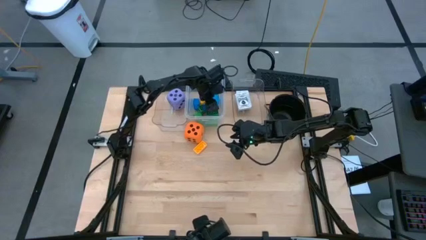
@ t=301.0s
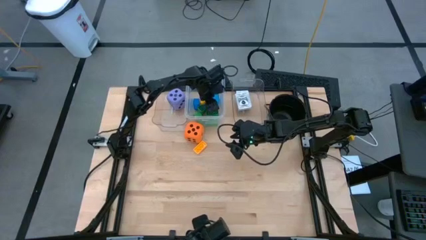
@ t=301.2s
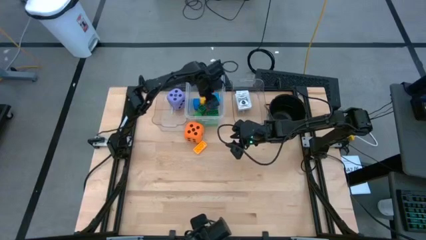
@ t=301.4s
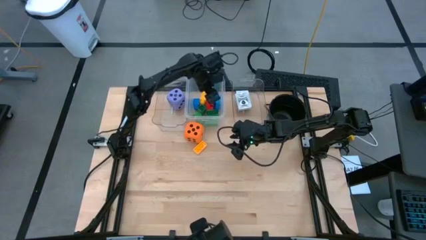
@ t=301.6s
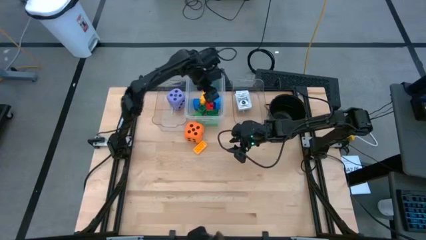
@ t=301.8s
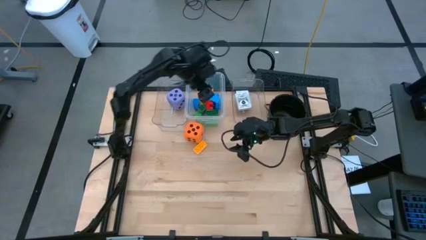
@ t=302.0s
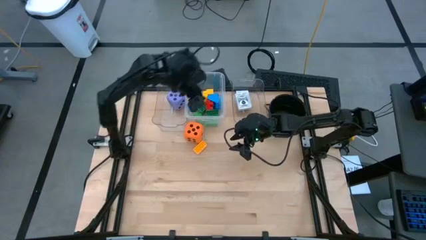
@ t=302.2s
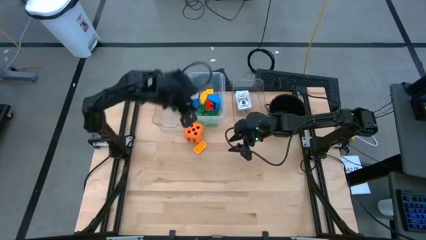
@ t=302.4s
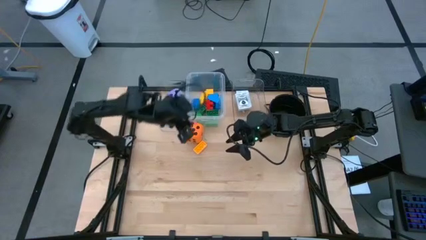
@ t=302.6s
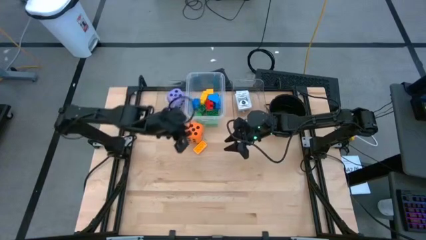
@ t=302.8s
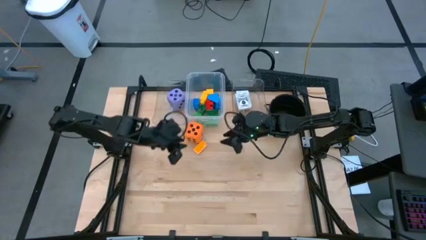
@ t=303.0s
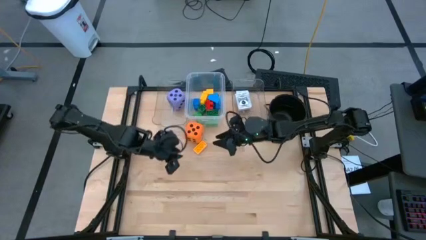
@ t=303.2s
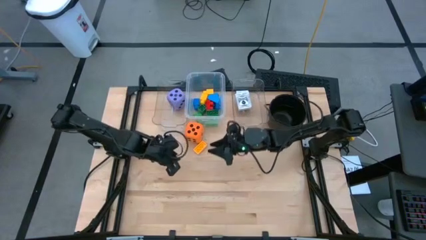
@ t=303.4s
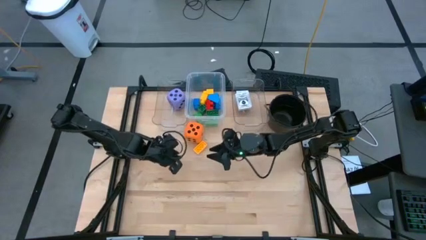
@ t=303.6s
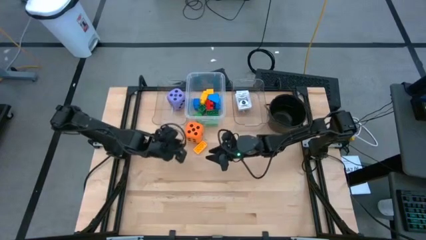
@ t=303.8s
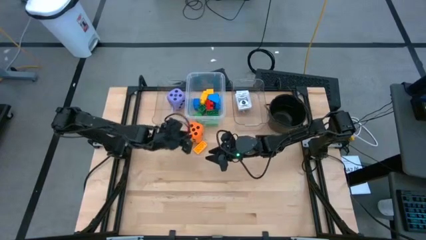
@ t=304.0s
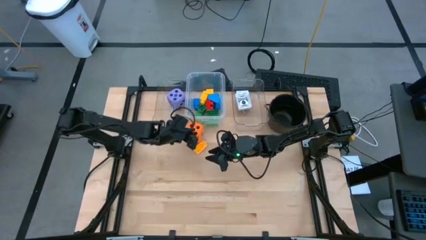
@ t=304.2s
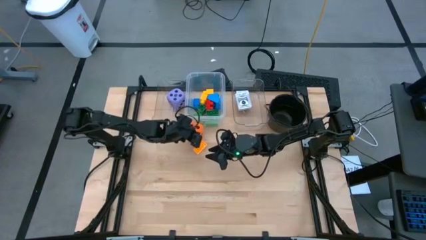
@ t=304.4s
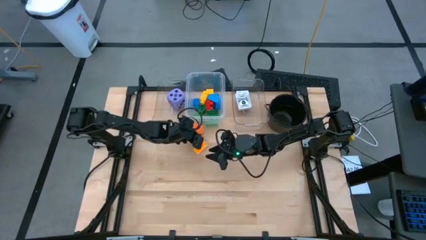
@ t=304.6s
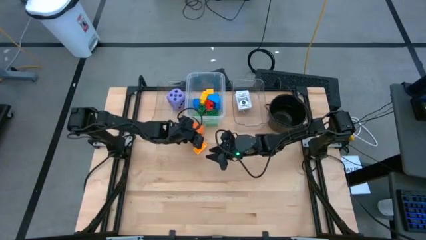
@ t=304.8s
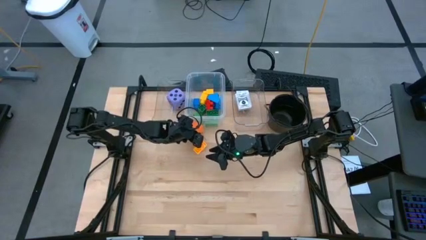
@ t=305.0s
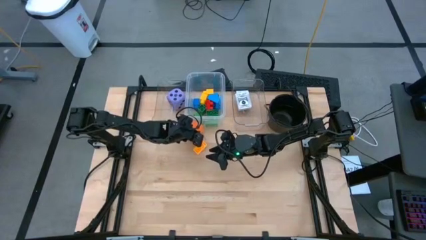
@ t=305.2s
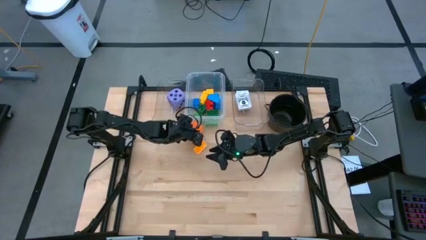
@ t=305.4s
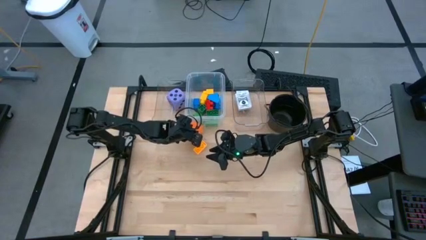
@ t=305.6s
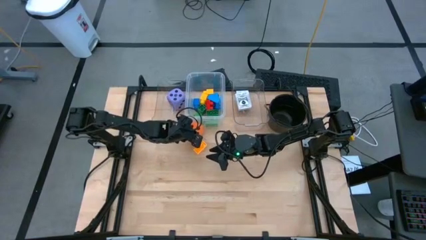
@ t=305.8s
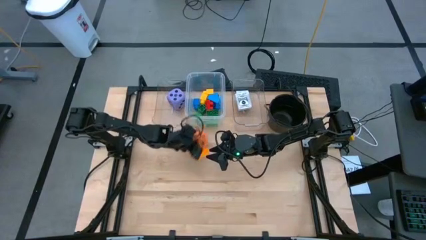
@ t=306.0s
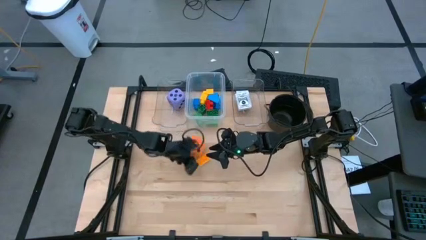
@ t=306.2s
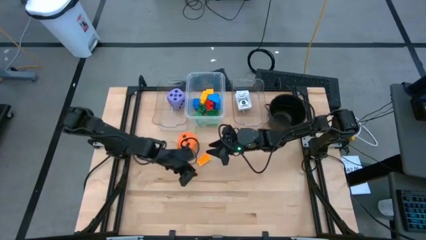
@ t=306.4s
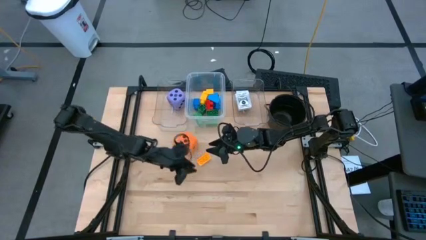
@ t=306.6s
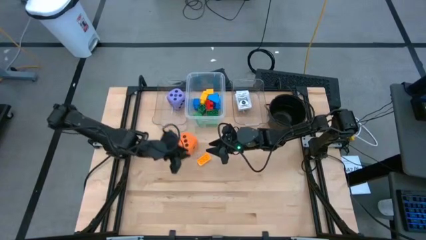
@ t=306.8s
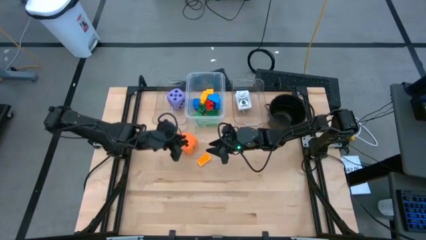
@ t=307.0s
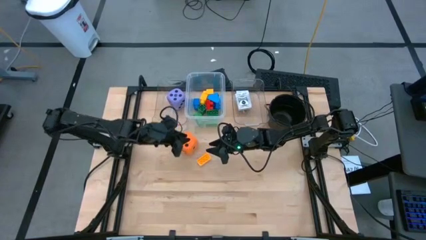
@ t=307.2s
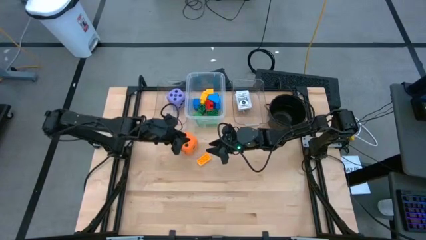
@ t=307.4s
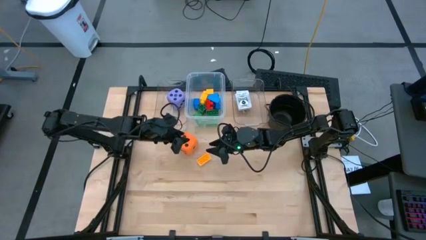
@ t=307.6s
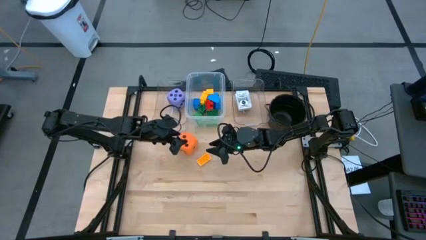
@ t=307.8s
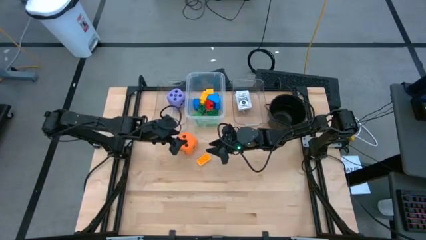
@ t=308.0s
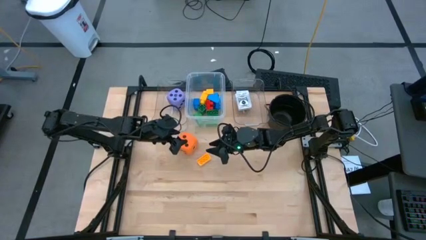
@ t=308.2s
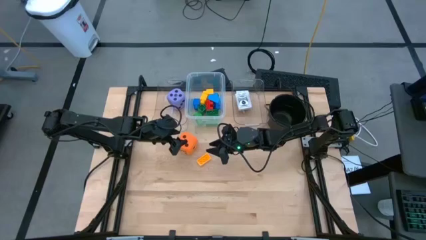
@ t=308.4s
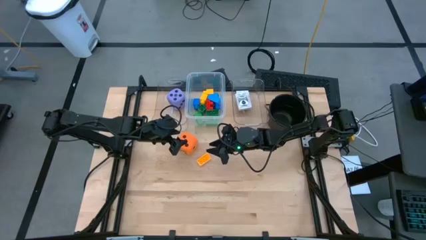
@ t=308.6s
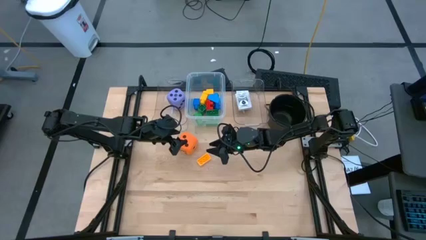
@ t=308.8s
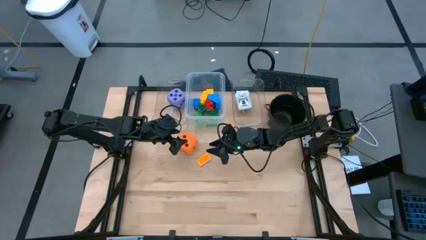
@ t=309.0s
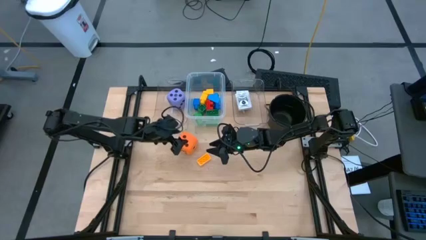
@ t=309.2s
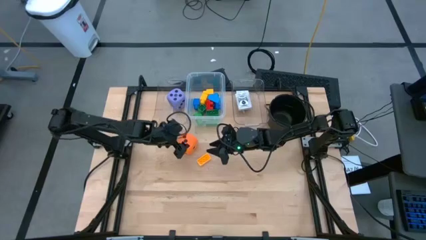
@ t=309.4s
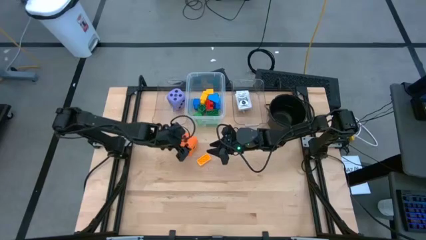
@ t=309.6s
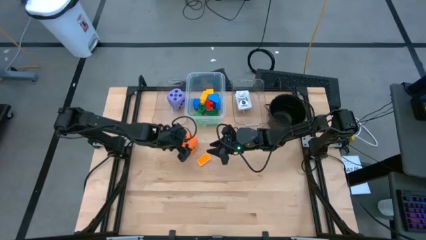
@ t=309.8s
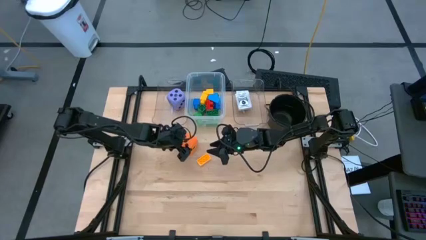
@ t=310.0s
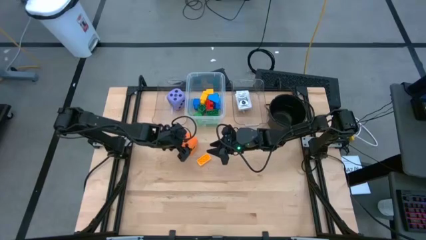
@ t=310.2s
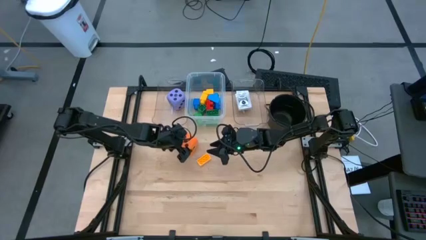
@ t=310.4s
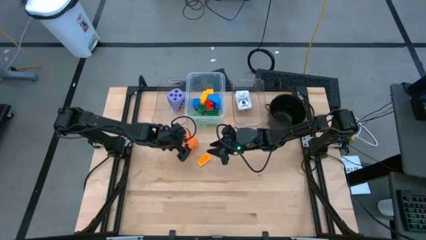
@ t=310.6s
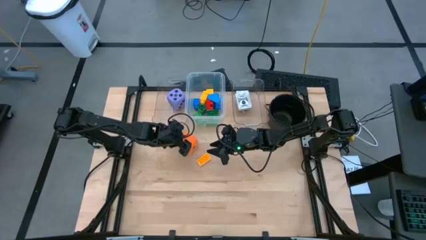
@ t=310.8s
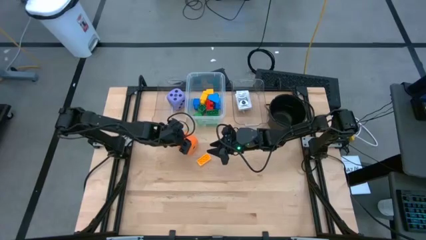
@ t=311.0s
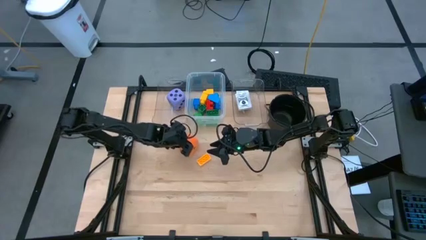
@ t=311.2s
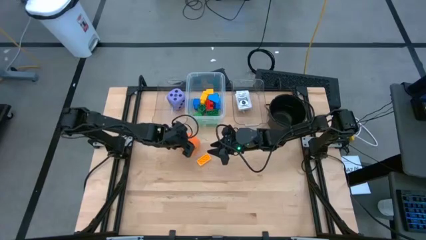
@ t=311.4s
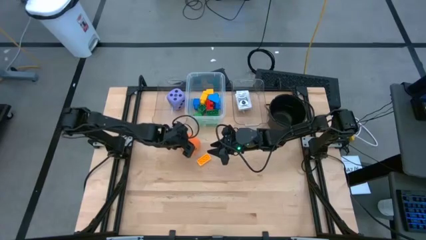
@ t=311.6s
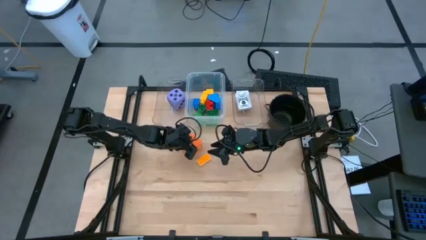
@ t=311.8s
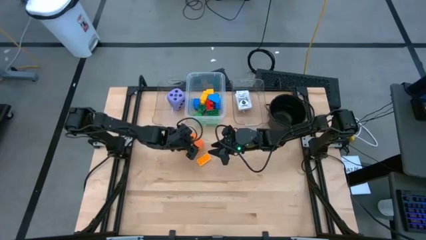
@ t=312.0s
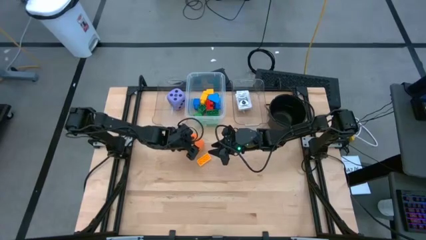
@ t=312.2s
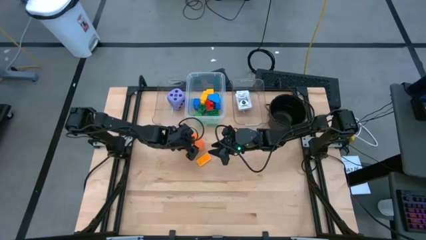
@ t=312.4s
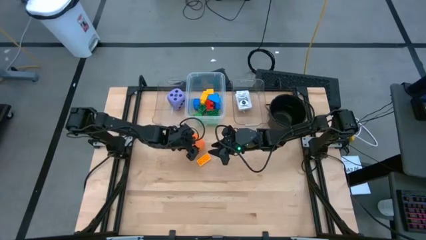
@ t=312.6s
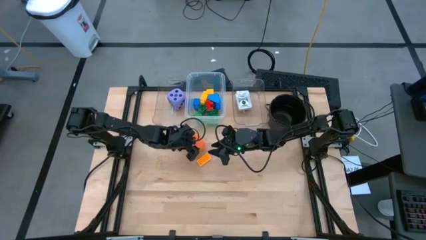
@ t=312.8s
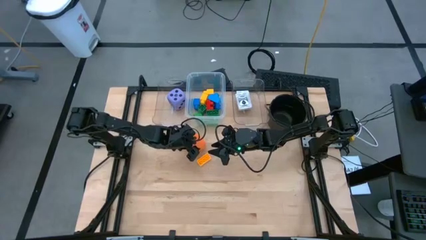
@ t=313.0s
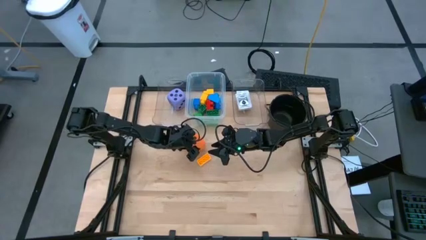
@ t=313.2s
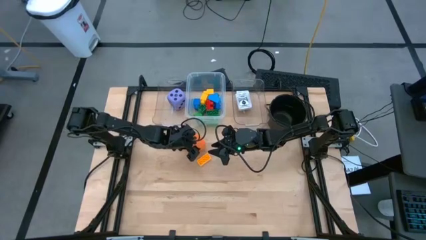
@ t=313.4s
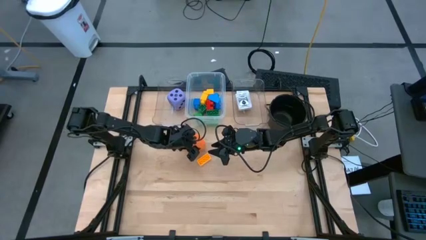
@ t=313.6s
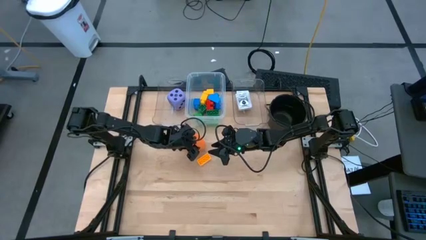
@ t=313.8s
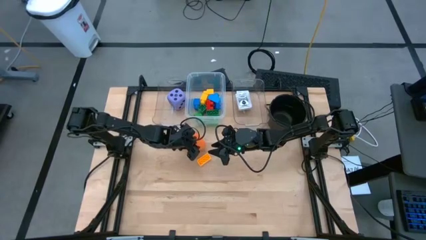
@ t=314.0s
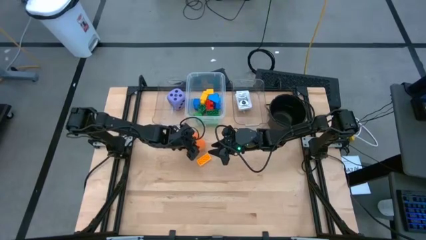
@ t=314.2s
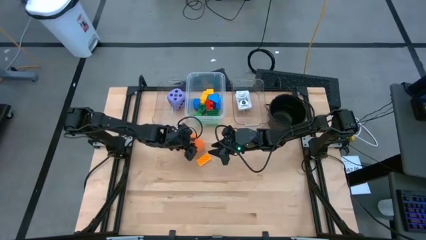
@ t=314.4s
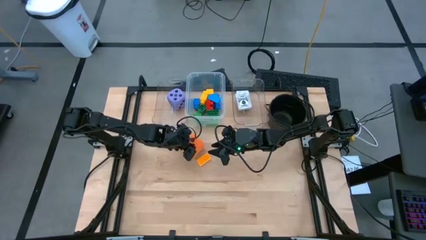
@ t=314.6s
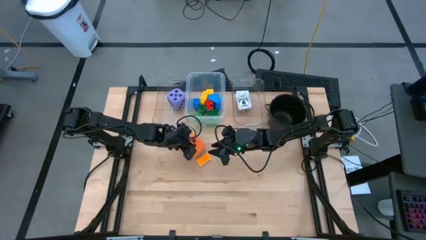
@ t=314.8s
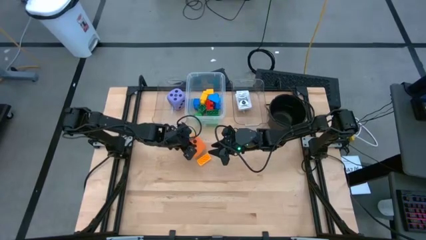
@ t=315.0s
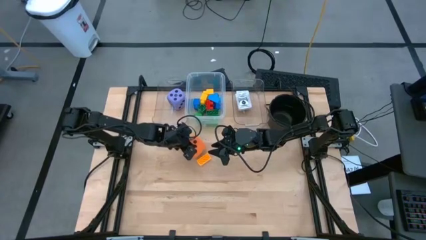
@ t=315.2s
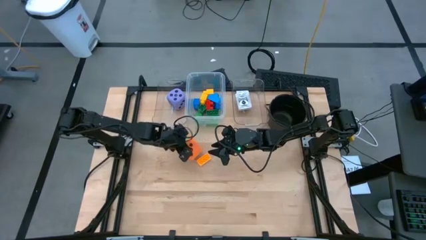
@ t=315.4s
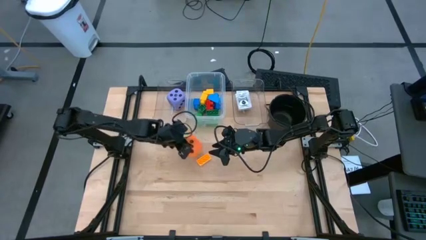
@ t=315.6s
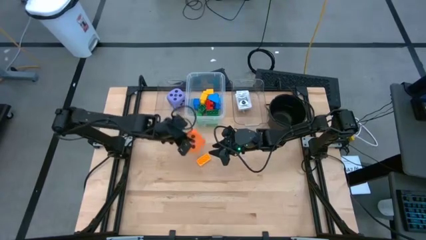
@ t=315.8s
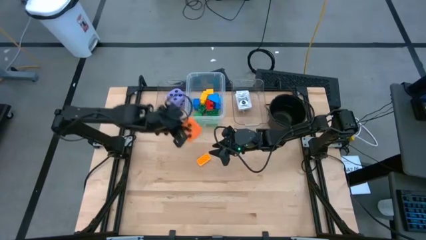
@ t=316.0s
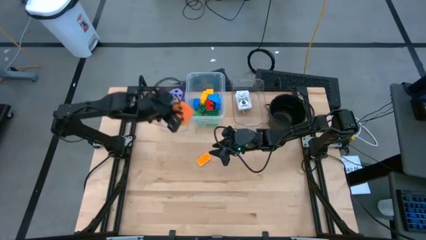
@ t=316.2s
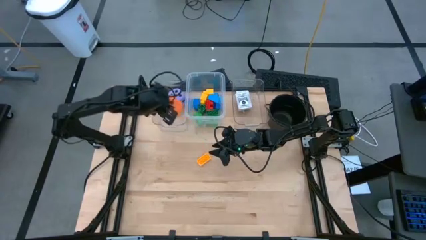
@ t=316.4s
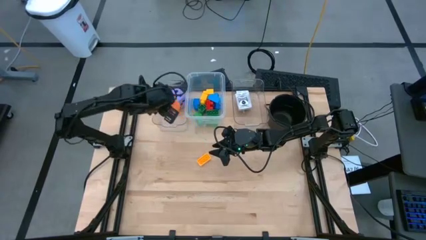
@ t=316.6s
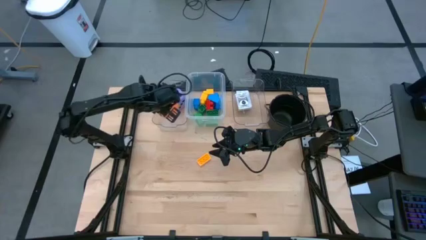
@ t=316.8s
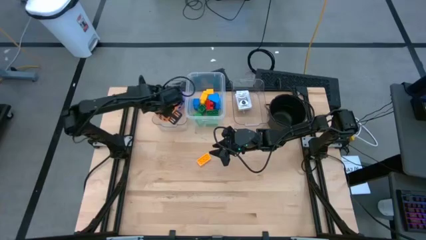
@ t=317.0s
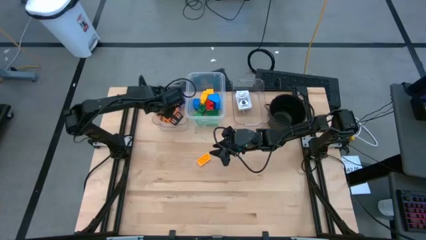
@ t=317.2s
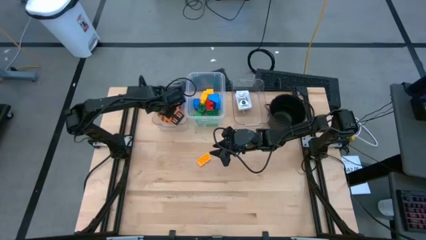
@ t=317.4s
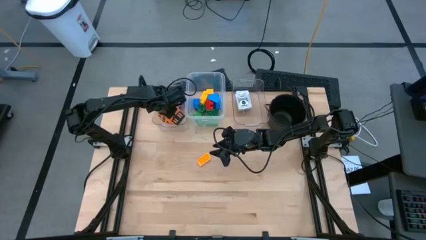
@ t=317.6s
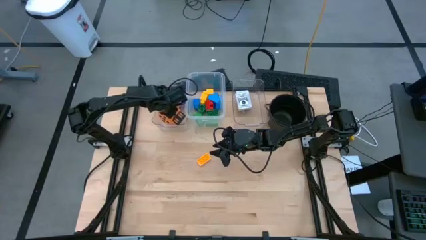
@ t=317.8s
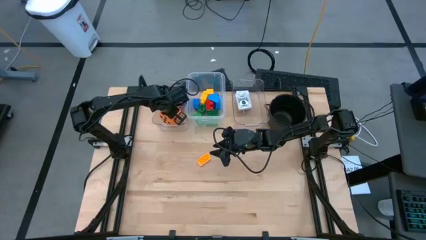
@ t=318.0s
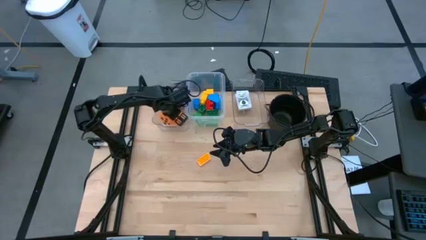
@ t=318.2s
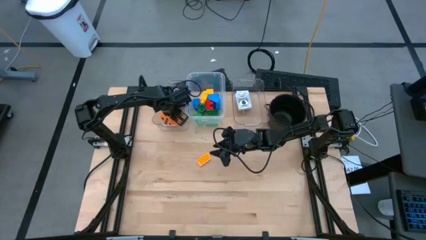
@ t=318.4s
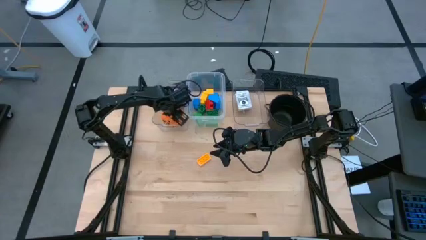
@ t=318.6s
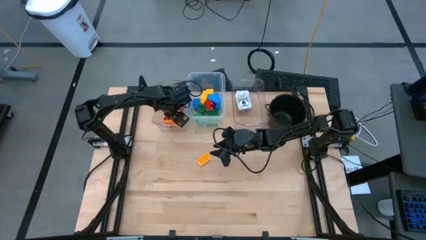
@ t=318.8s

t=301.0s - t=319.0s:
Task: Pick & Place Toys
Put the orange die into the left transparent bin
